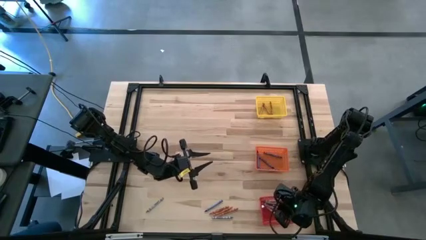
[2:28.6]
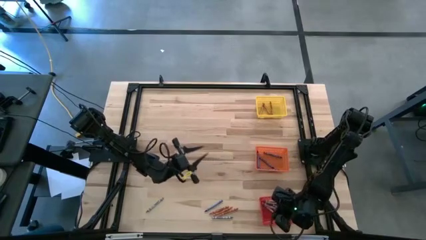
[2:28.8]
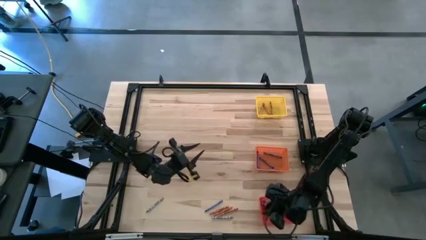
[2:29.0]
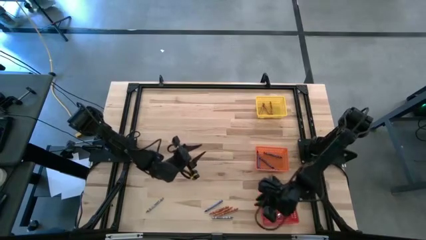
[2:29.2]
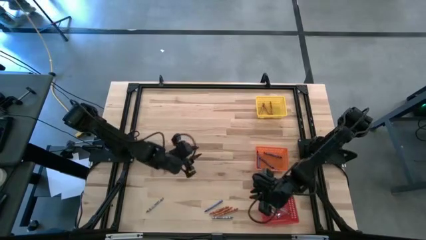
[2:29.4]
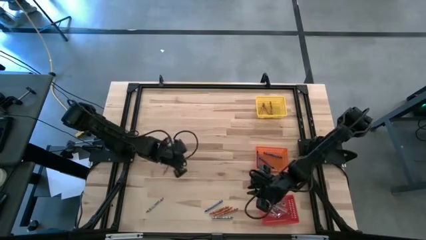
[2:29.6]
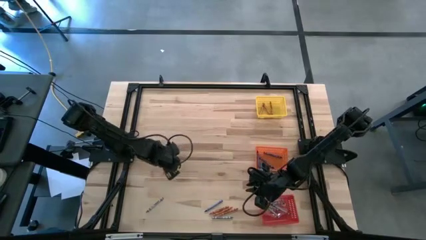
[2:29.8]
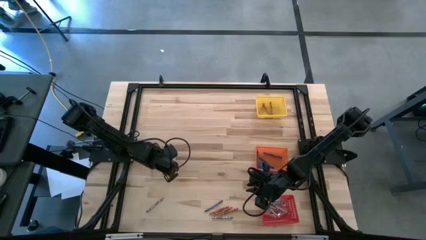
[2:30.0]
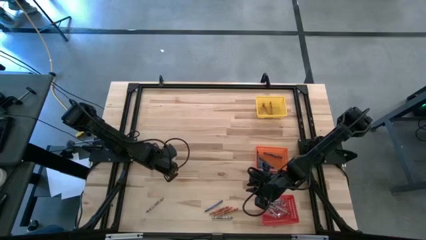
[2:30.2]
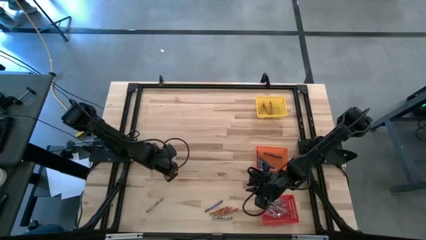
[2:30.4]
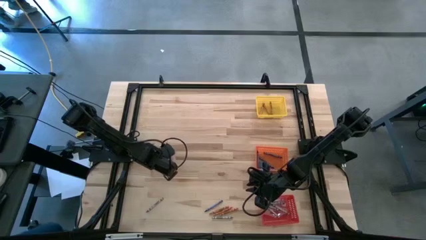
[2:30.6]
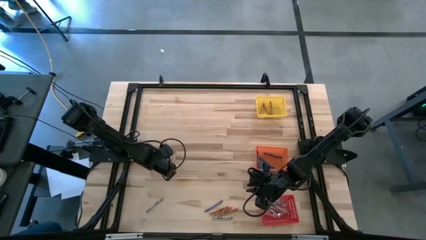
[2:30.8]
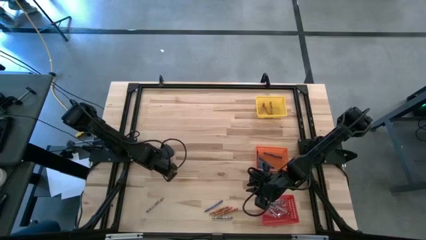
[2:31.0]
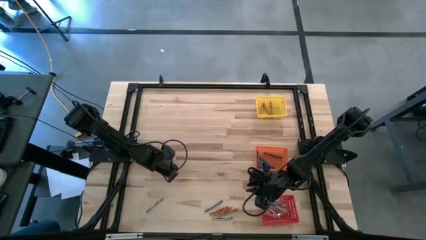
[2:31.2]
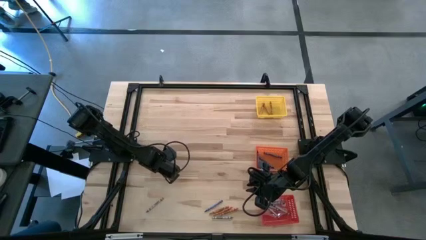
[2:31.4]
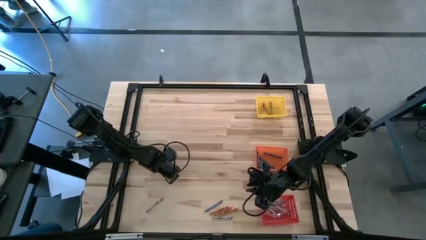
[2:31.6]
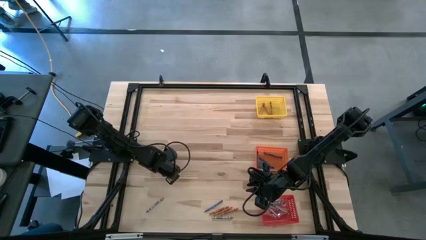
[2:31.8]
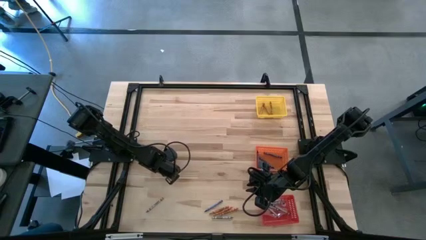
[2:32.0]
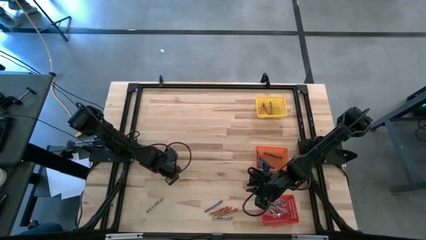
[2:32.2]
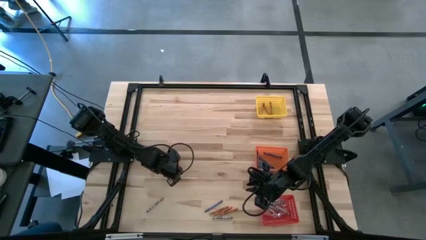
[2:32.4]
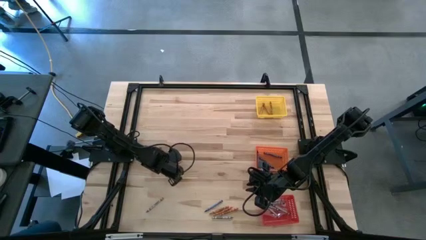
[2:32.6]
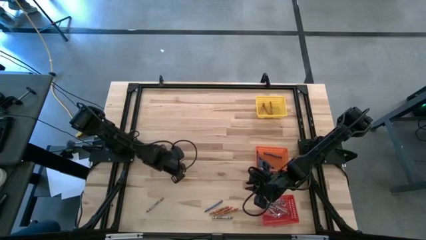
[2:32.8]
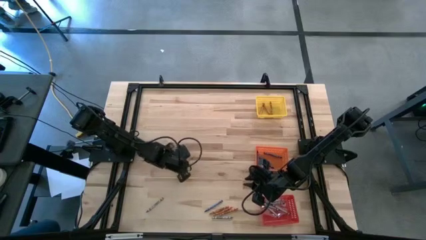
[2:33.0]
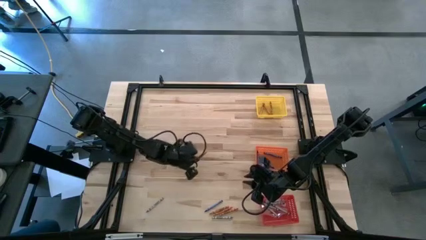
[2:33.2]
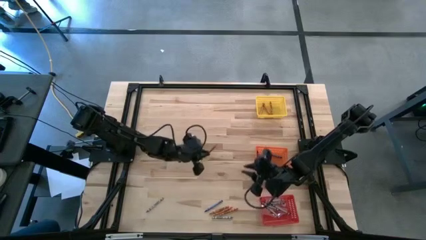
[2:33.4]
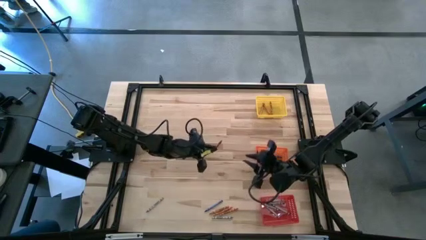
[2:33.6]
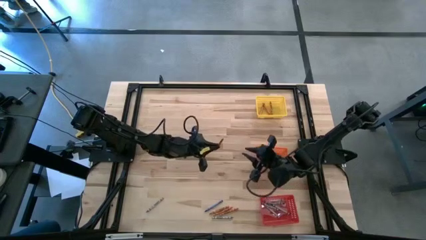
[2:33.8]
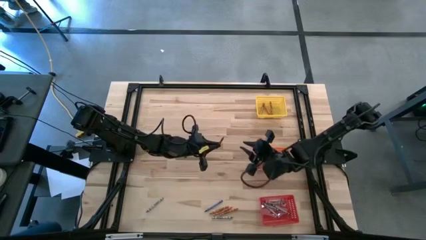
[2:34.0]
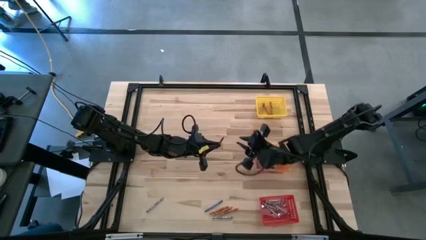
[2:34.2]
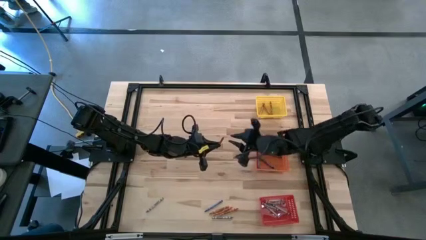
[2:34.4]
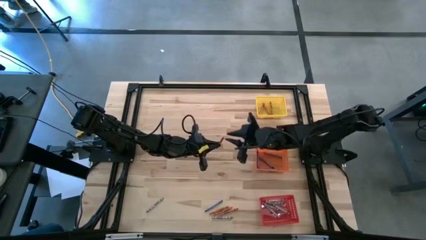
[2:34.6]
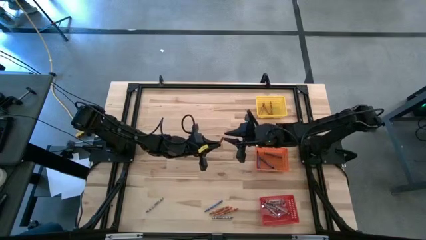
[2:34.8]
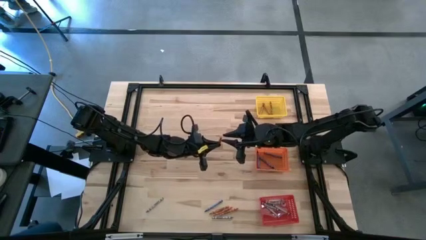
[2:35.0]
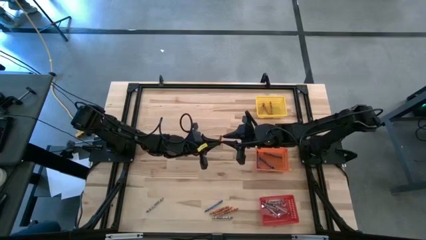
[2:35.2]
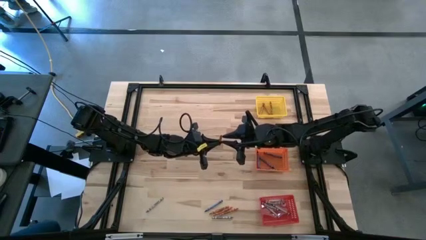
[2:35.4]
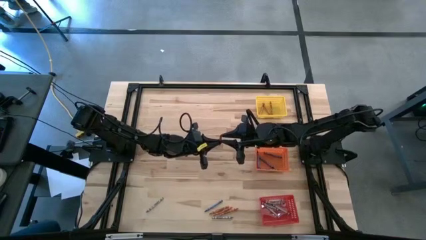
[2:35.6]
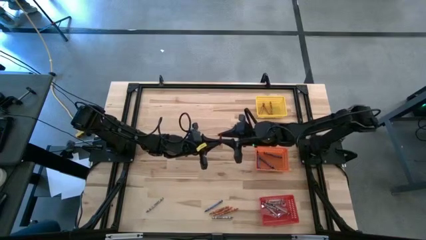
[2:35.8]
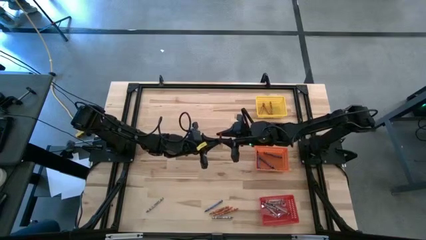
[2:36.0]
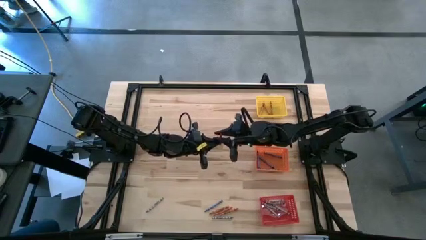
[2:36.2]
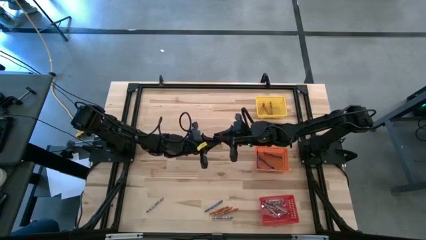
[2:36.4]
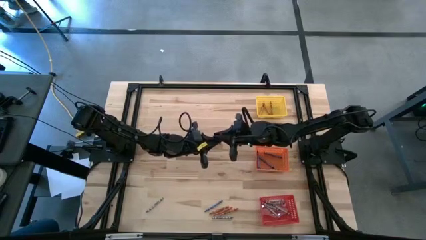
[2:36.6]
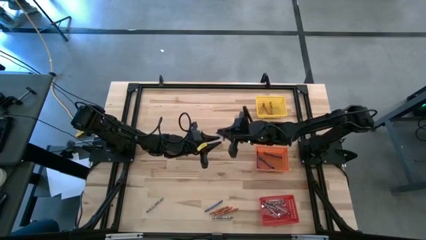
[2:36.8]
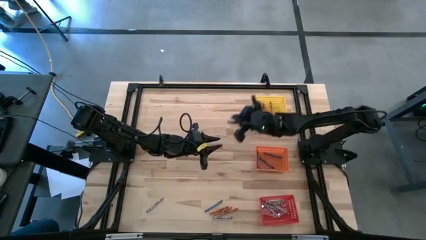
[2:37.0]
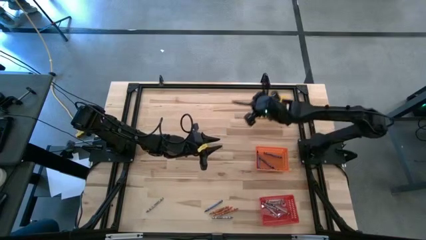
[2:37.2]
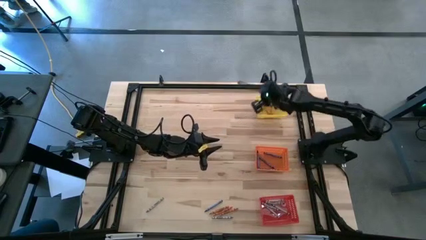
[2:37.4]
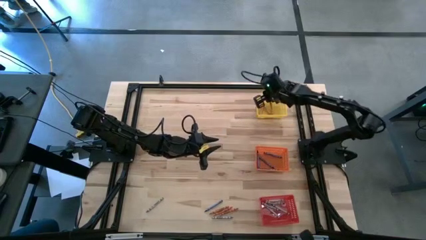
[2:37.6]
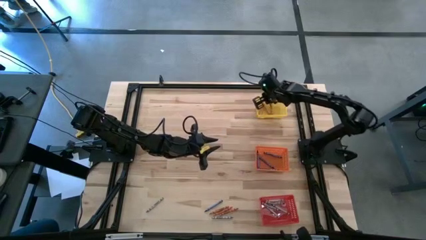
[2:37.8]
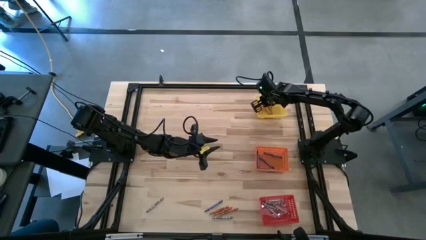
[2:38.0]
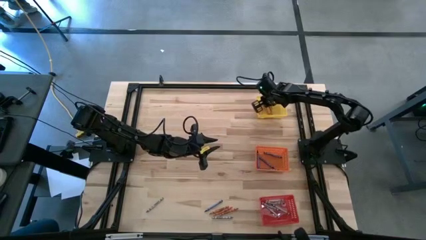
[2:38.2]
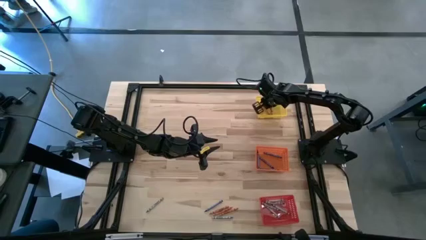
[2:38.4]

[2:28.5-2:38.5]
Task: Sort crayons
Put the orange crayon into the yellow bin

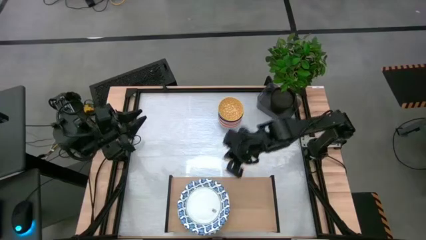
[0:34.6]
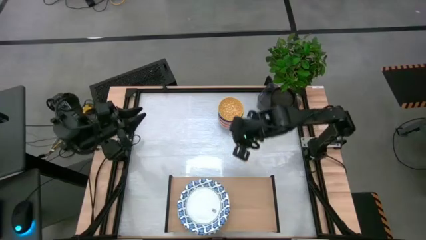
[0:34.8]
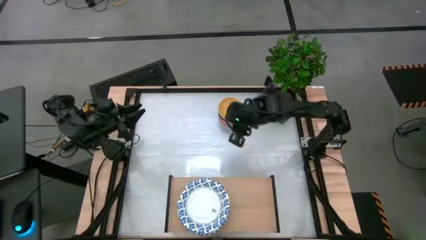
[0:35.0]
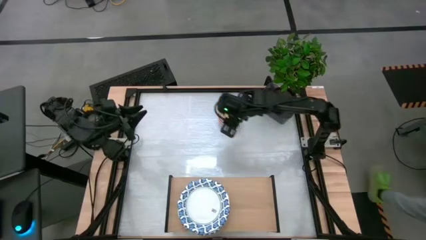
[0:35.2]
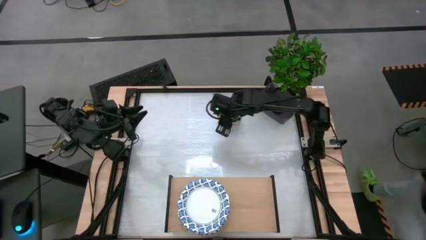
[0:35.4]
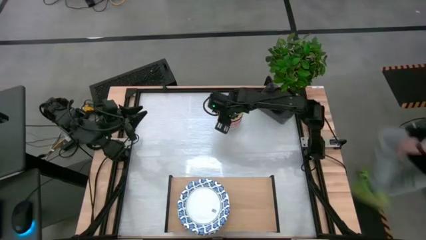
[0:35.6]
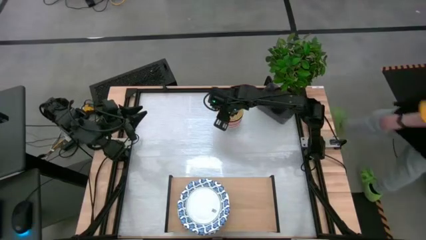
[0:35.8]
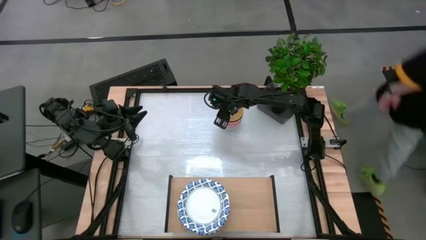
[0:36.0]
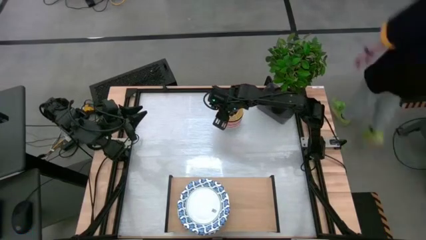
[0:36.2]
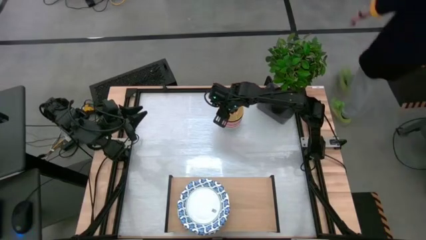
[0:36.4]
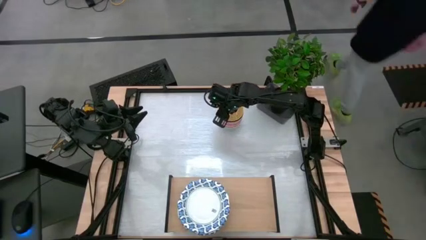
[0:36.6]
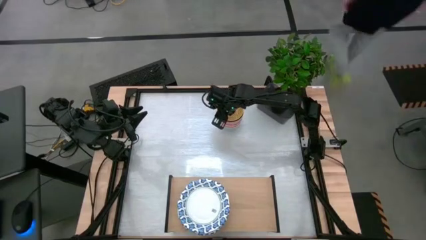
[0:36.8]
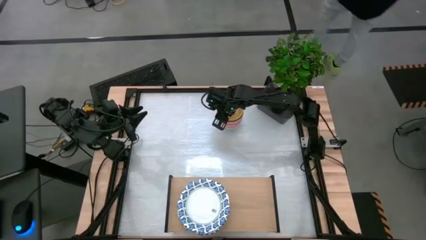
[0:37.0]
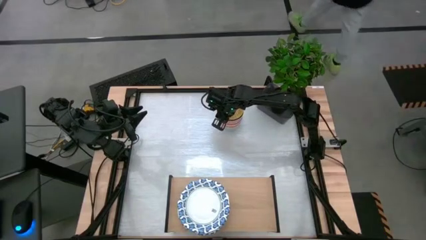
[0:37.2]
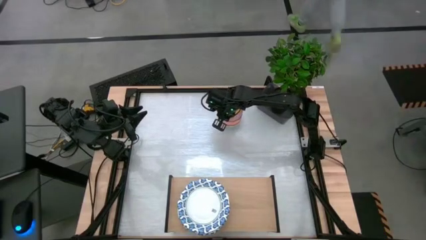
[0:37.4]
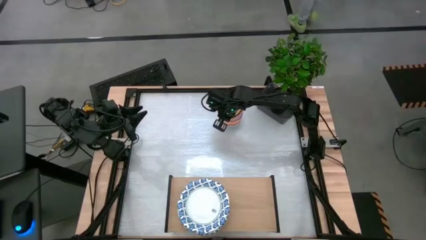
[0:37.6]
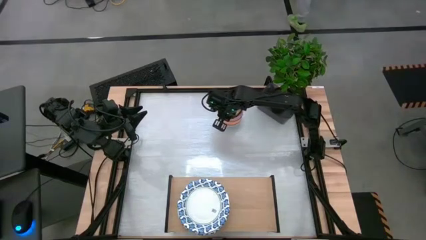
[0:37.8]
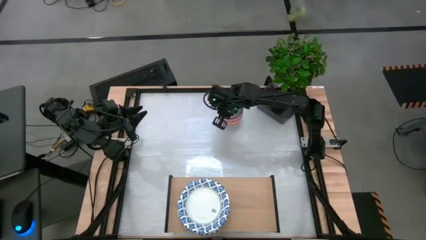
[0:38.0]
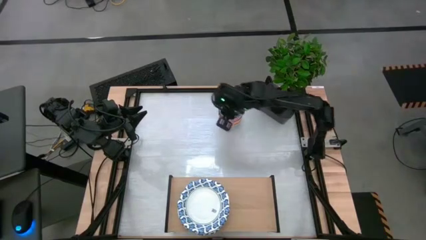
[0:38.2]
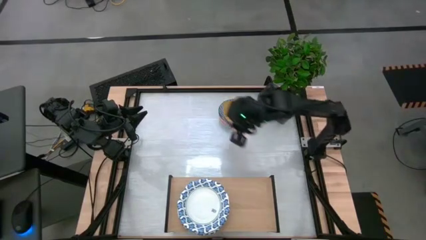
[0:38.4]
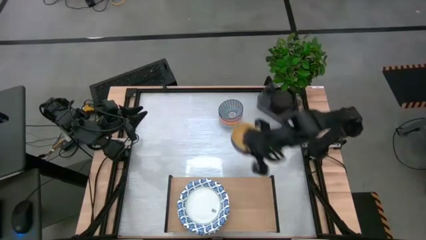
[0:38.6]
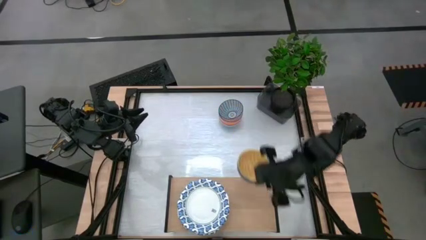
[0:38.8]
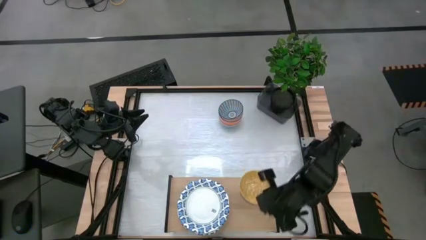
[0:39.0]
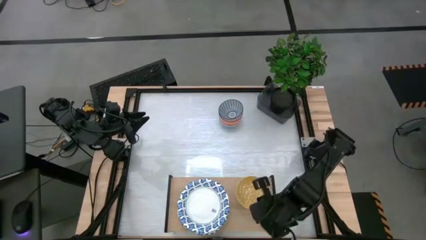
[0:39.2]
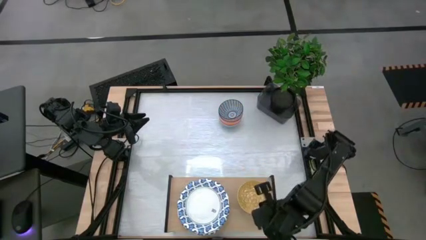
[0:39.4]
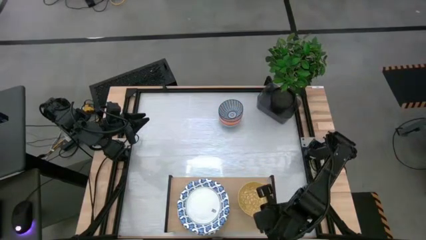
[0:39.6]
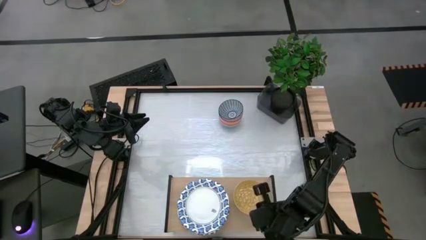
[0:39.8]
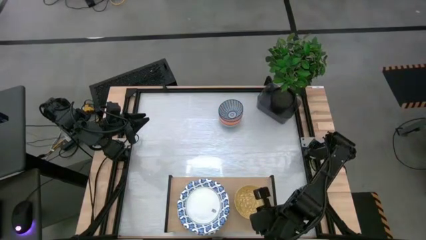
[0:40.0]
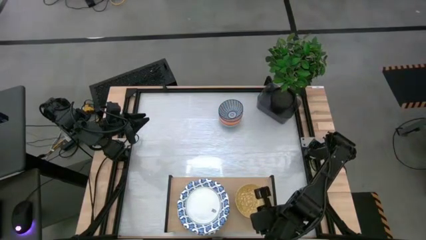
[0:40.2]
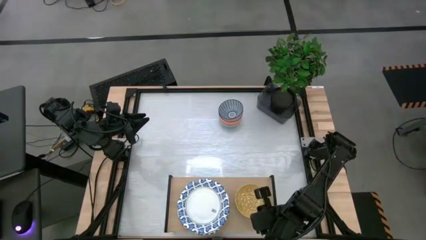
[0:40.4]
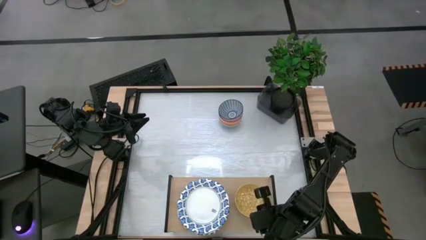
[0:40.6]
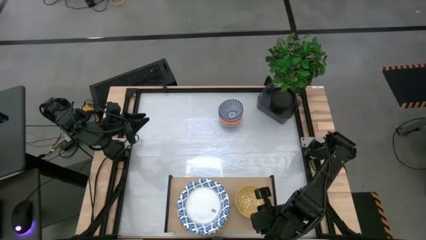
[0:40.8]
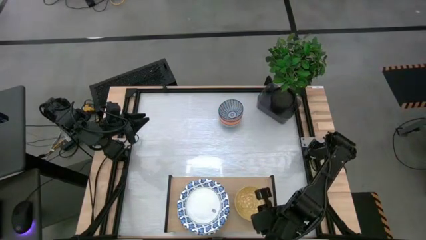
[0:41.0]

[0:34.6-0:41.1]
Task: Place and stack plates onto a shelf
Put the yellow bowl on the shelf
